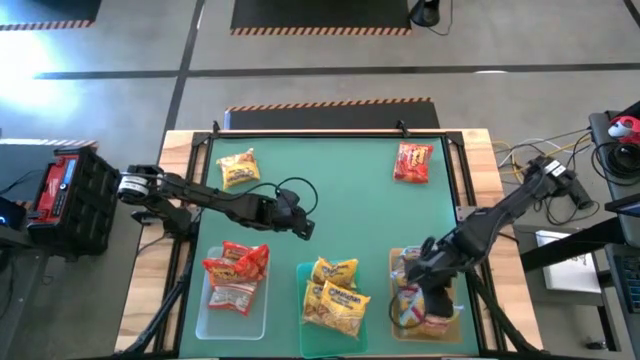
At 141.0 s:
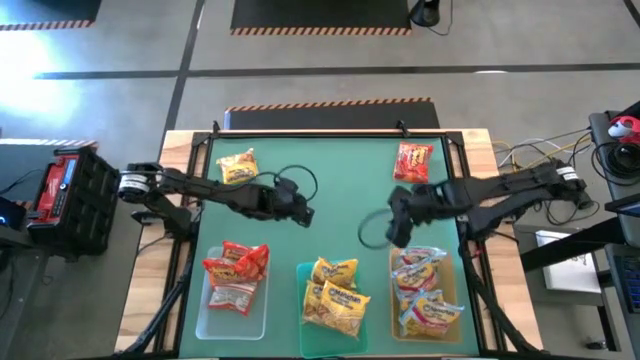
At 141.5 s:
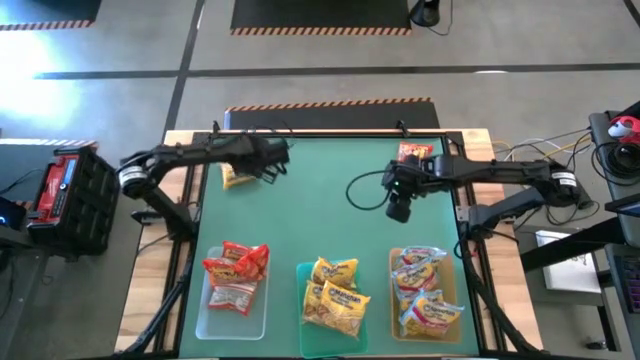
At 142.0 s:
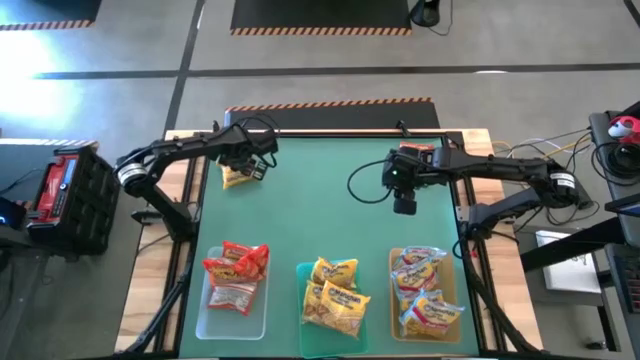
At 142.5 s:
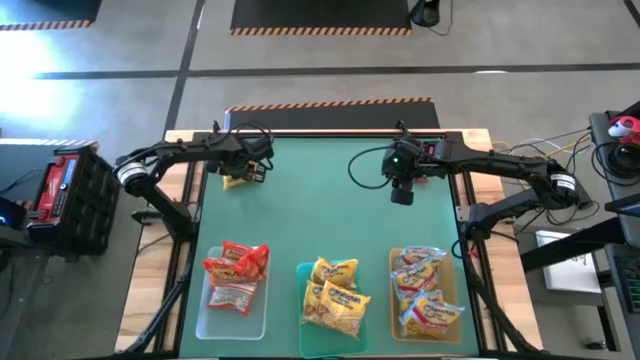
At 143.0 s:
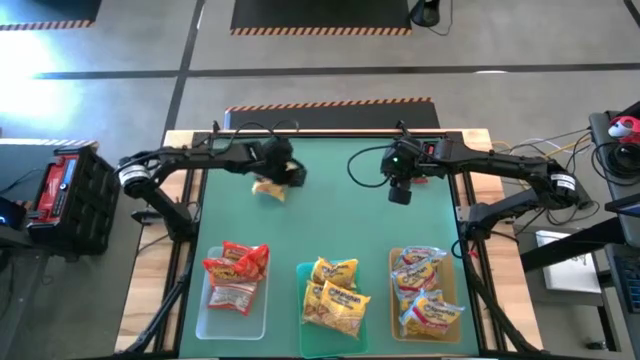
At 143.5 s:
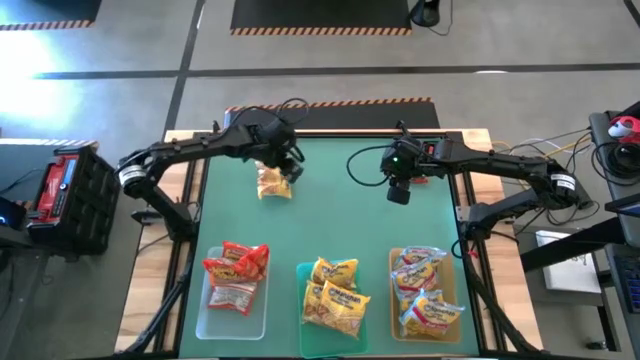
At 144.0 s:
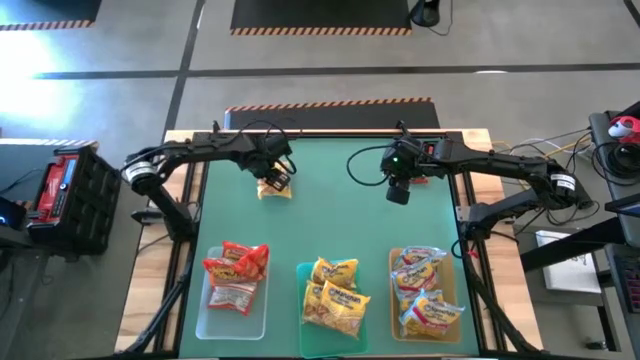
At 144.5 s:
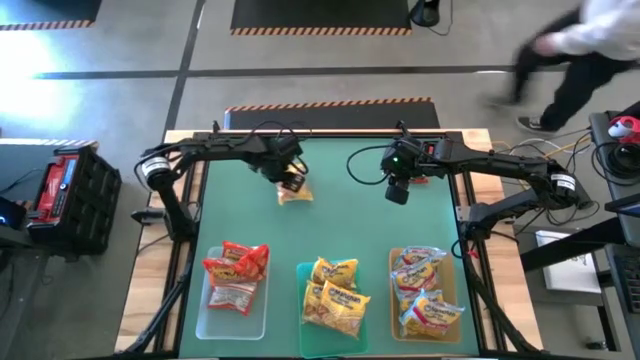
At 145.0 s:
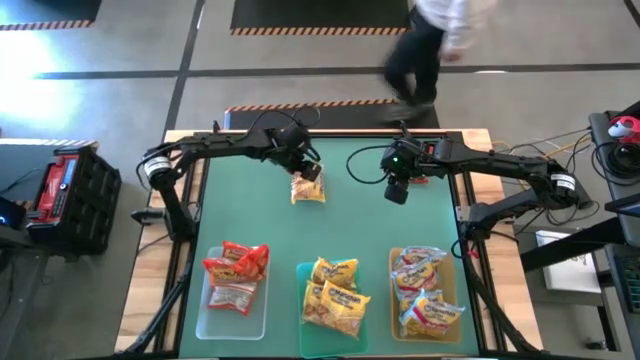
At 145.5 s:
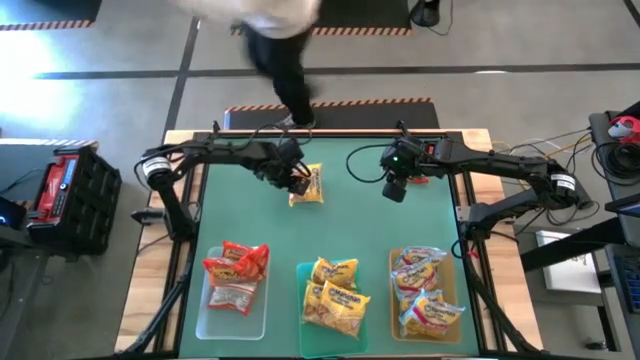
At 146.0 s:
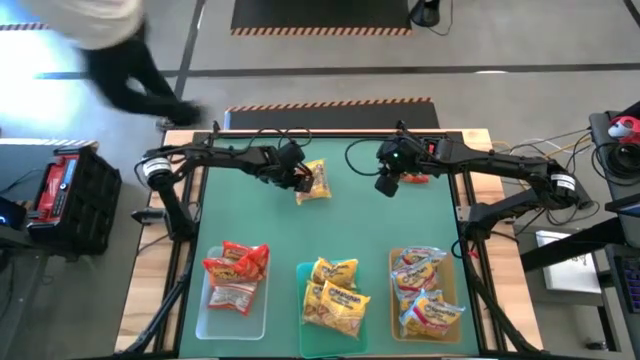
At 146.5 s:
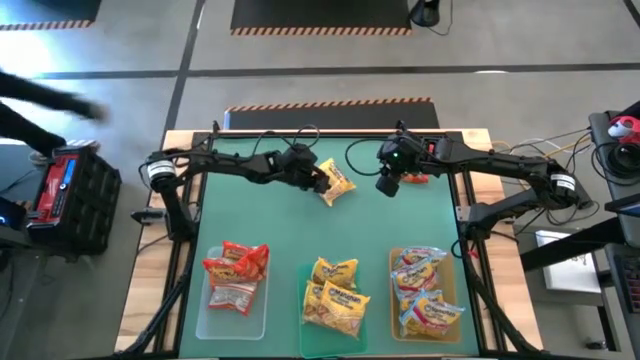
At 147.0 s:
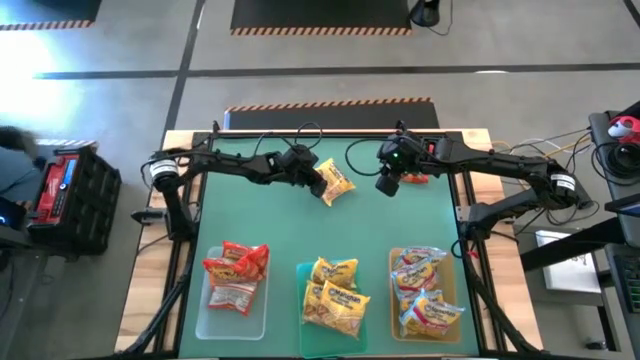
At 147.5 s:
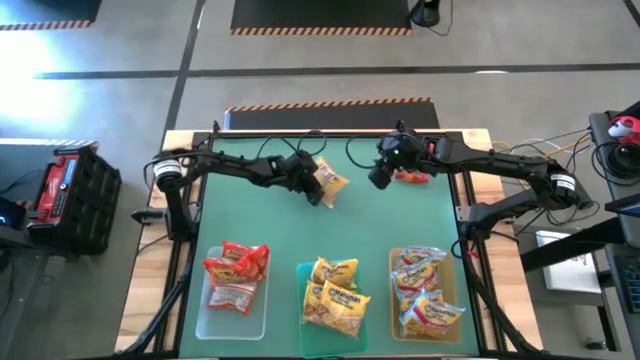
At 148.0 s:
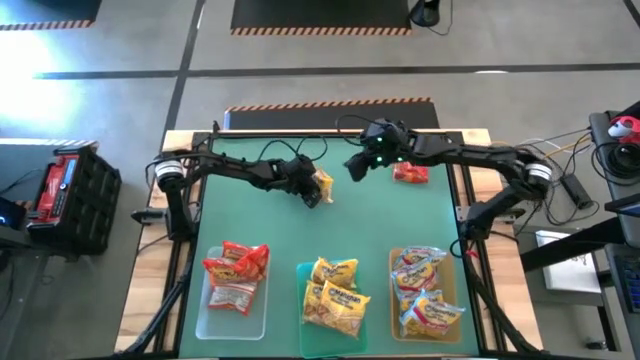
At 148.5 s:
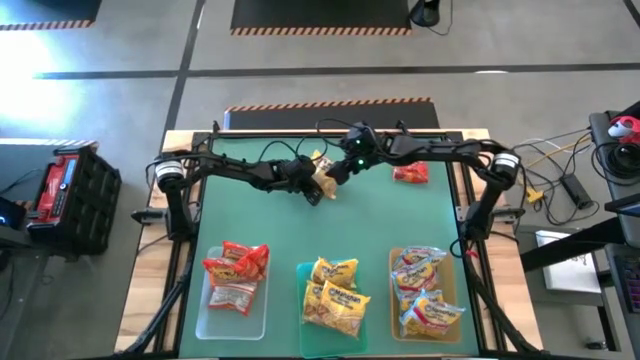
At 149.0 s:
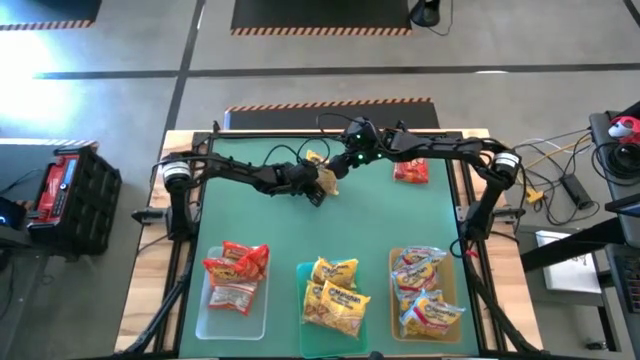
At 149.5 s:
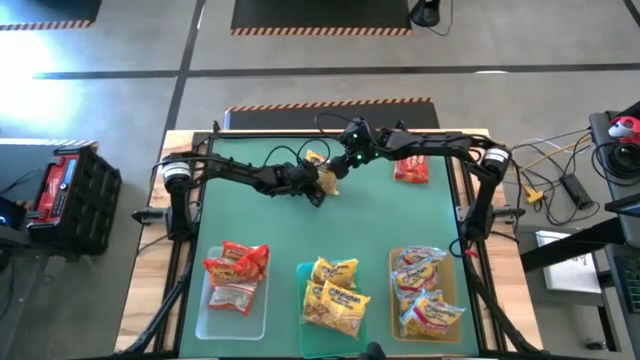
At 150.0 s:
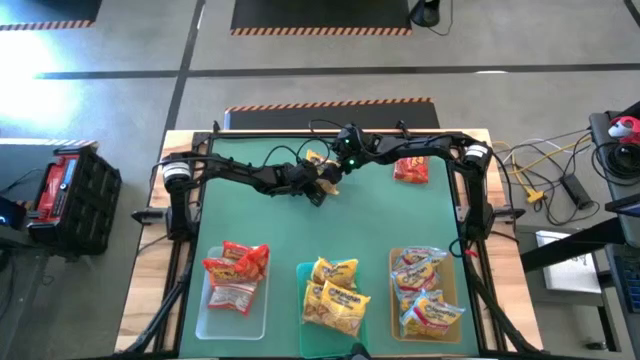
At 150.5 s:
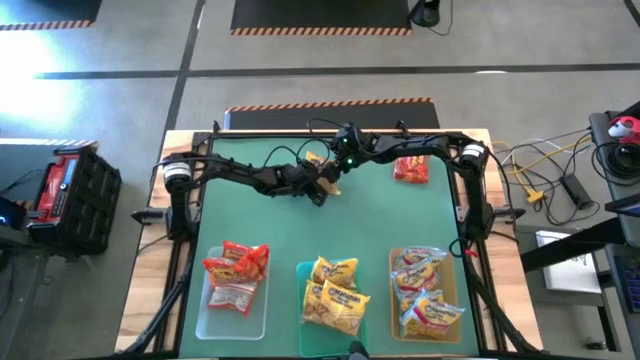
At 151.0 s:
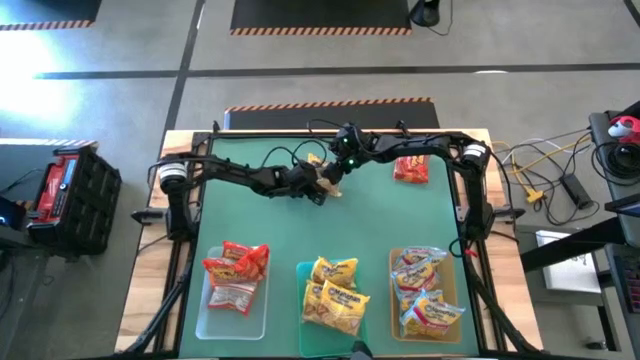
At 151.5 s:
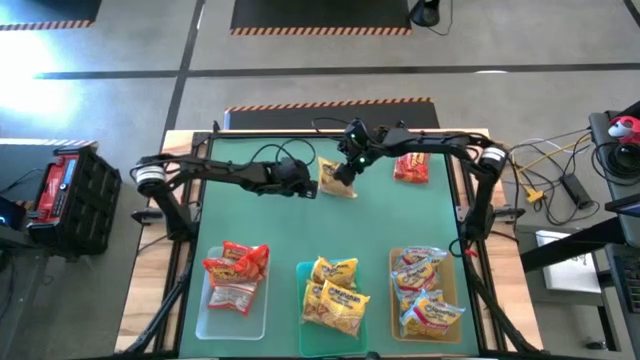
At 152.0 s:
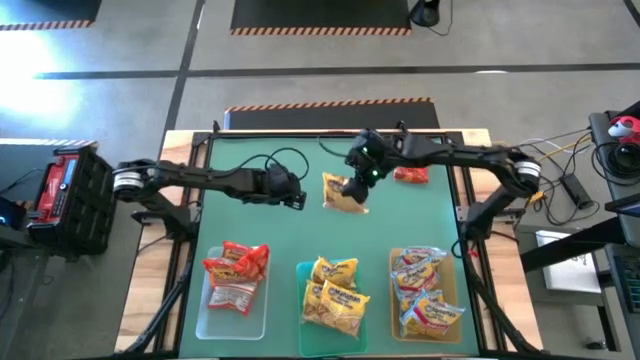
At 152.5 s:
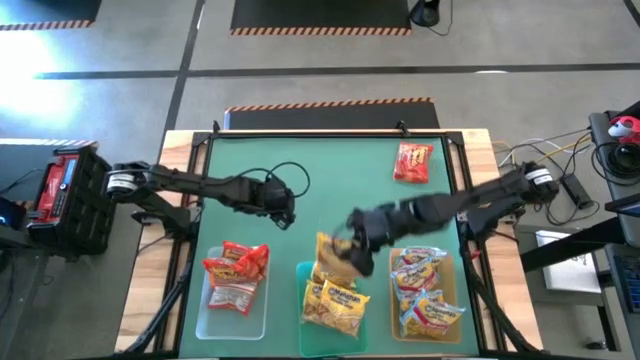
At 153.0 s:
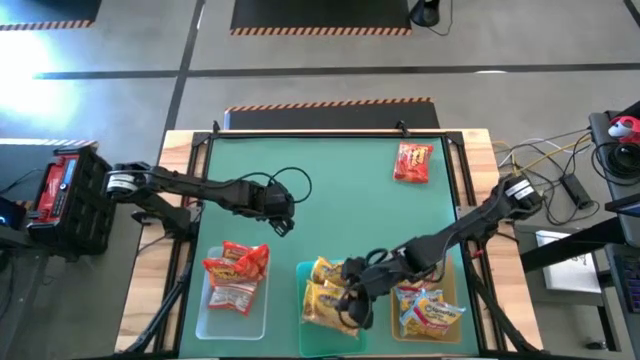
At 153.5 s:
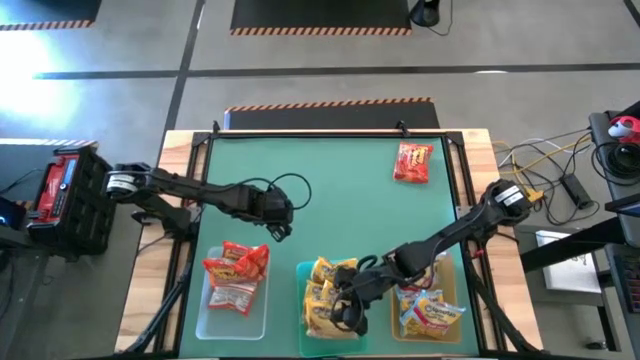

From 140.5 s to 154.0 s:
Task: Sort Maruchan noodles
Put the yellow noodle pack into the green bin

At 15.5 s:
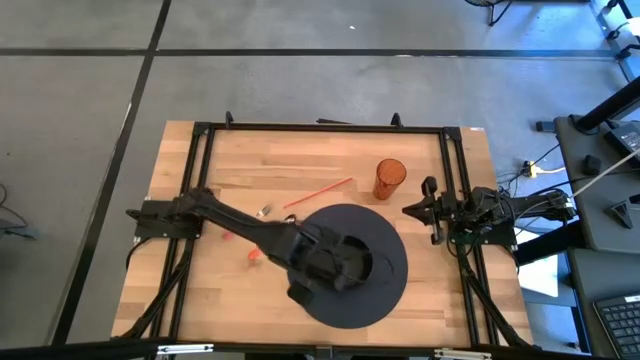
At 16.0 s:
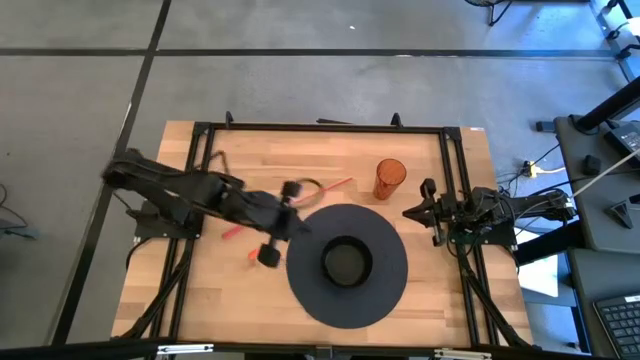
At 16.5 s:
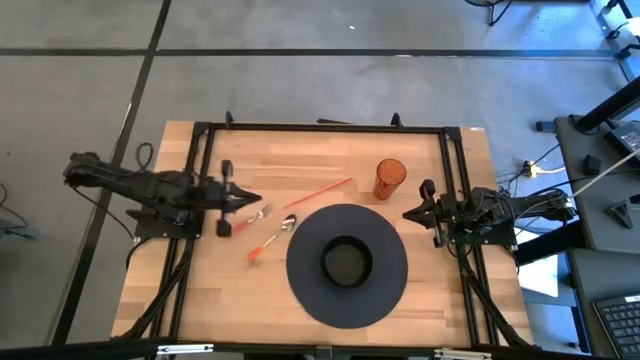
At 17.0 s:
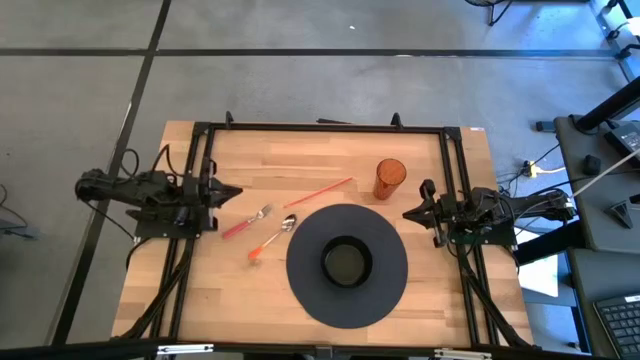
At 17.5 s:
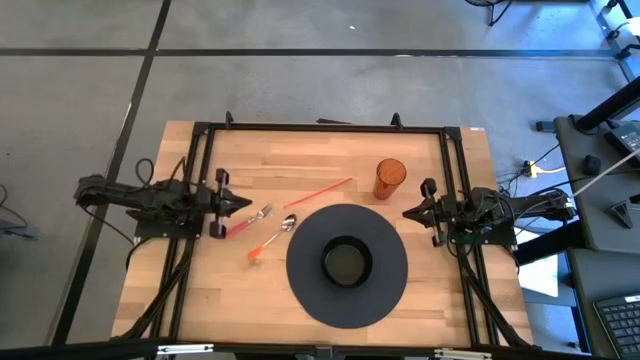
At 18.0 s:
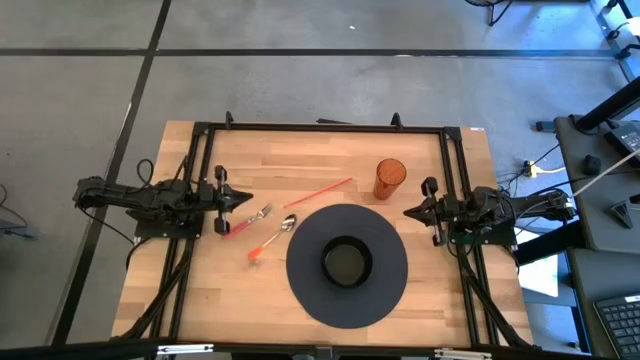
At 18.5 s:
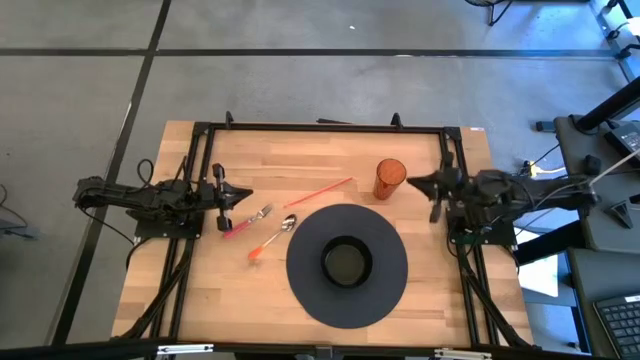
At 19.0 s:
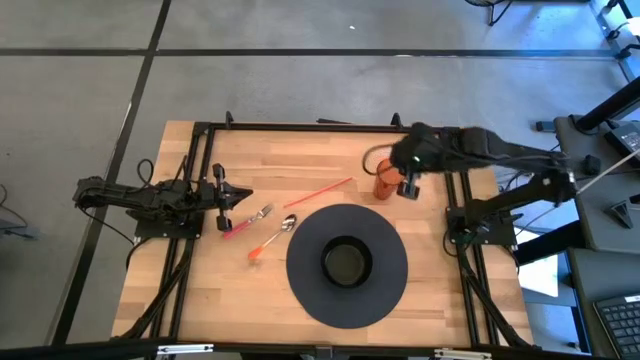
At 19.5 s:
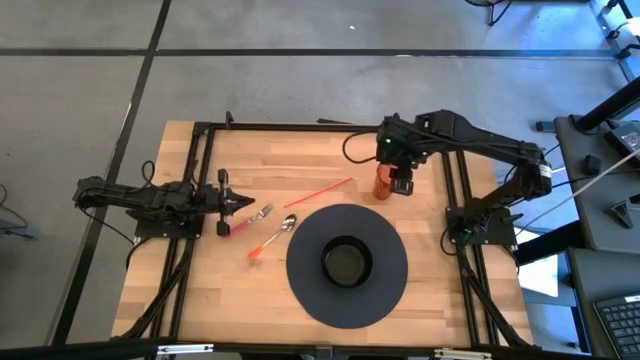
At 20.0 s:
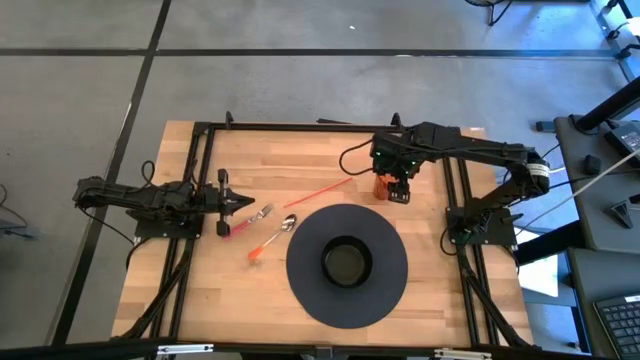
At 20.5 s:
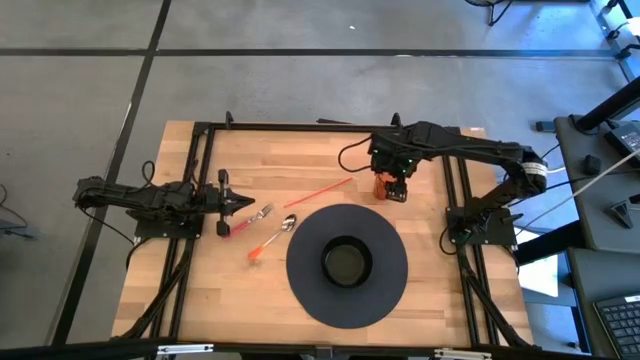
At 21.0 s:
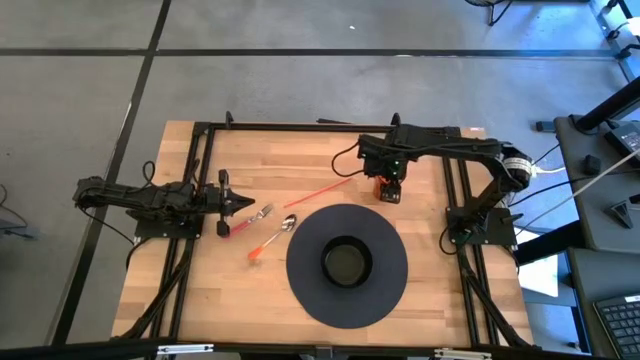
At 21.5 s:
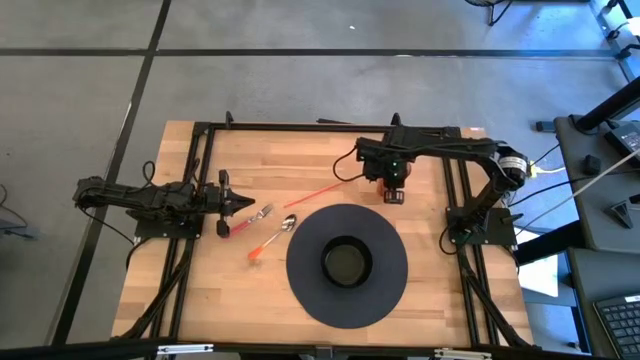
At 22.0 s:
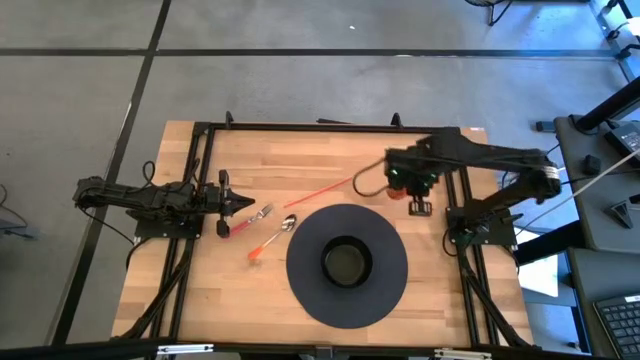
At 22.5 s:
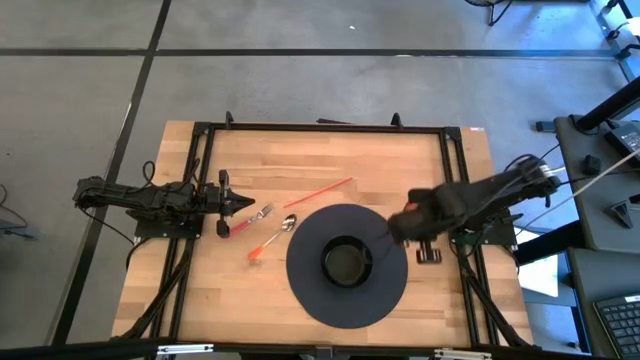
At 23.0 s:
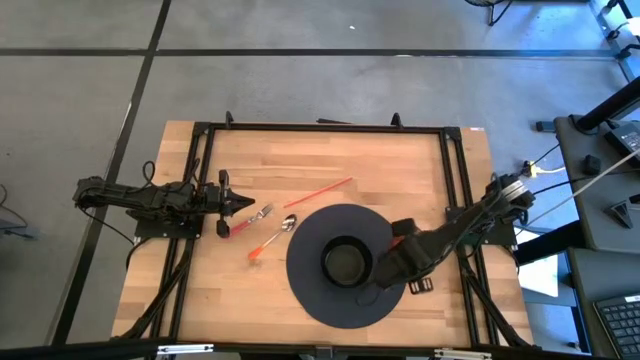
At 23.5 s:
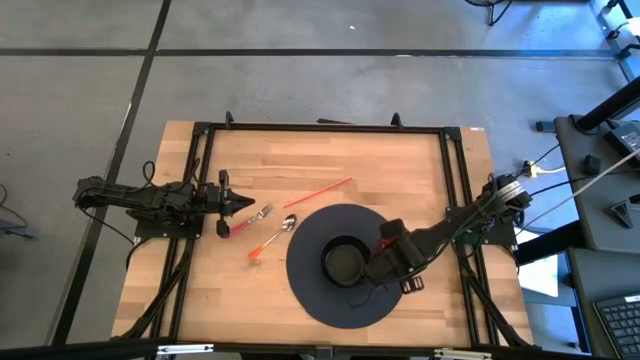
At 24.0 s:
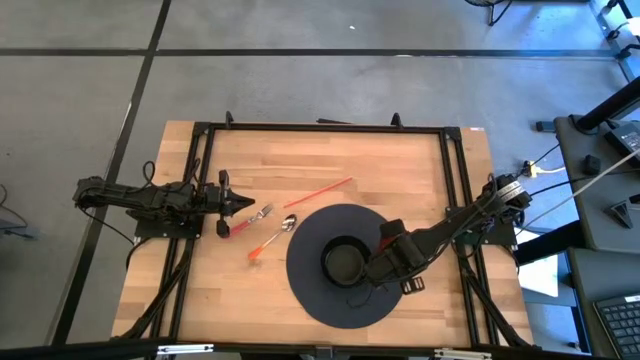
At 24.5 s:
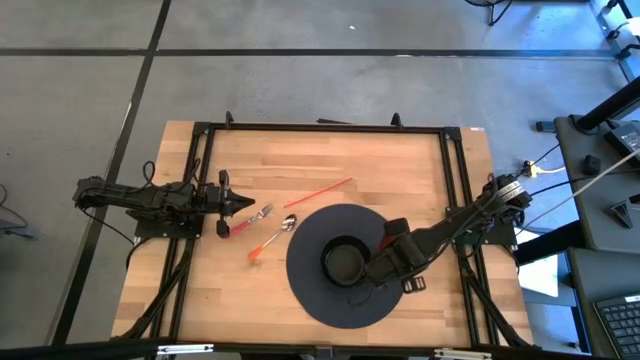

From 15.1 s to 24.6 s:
Task: Pick & Place Utensil
Put the brown cup on the black mat to the right side of the black bowl
